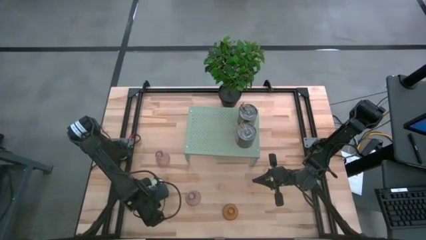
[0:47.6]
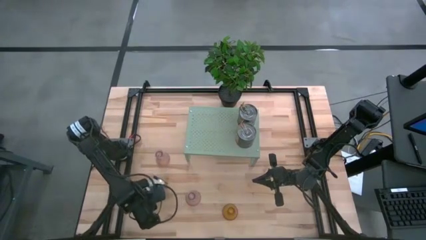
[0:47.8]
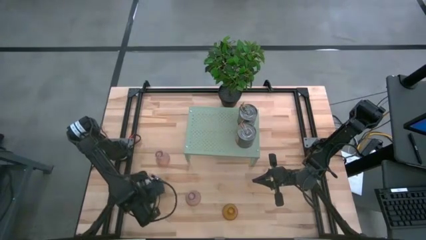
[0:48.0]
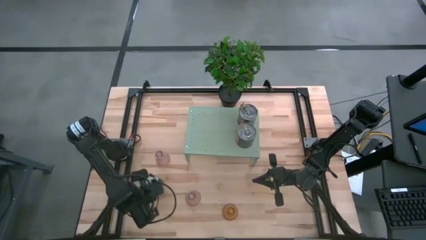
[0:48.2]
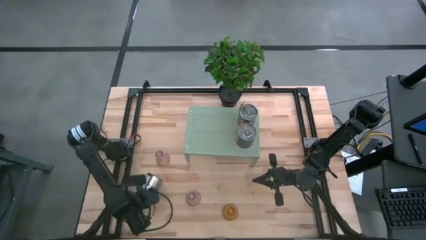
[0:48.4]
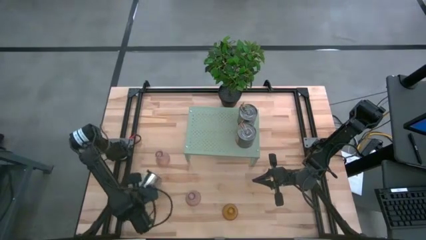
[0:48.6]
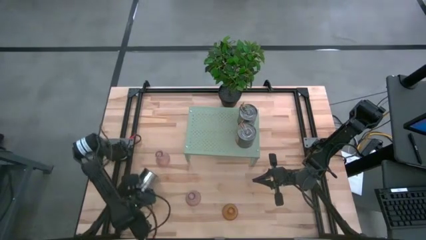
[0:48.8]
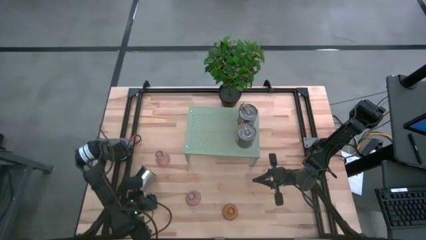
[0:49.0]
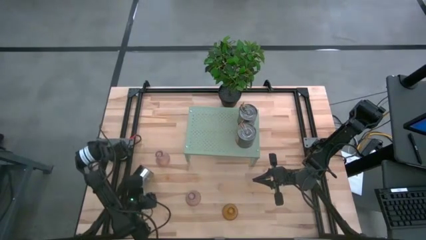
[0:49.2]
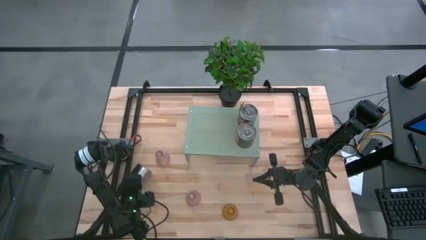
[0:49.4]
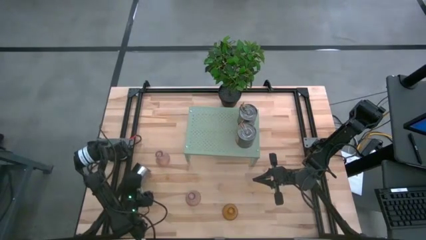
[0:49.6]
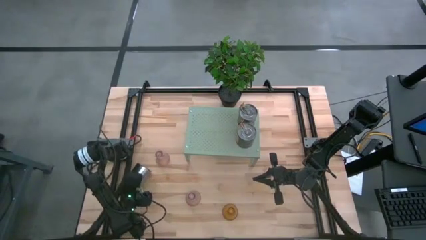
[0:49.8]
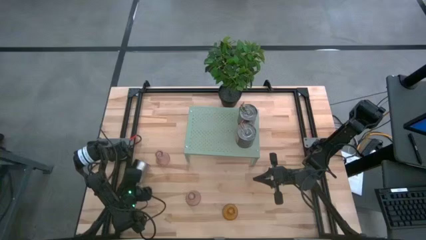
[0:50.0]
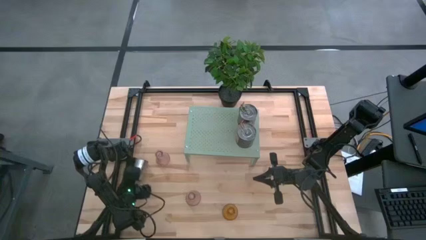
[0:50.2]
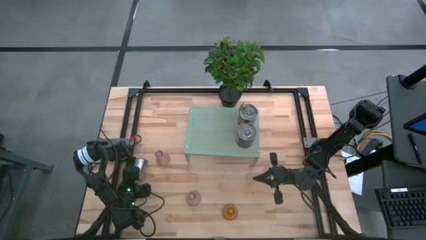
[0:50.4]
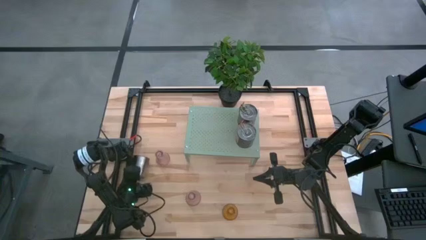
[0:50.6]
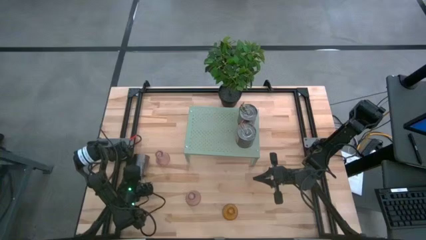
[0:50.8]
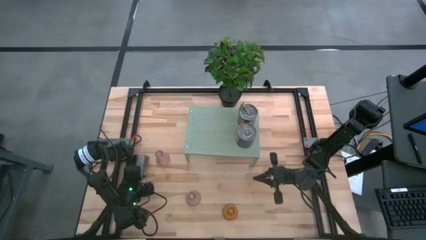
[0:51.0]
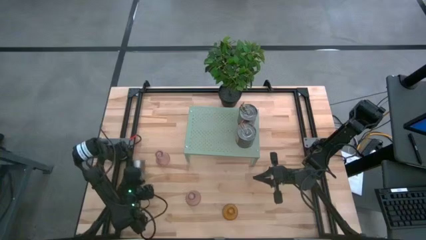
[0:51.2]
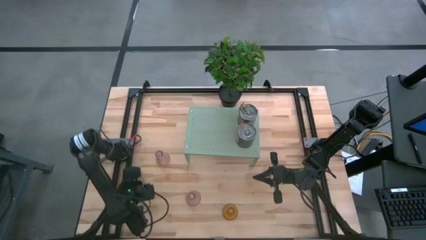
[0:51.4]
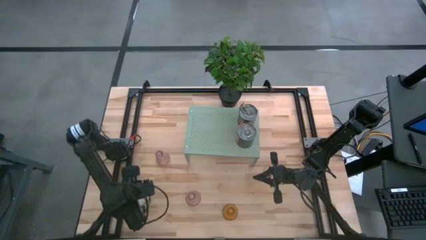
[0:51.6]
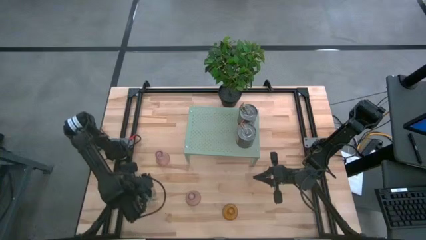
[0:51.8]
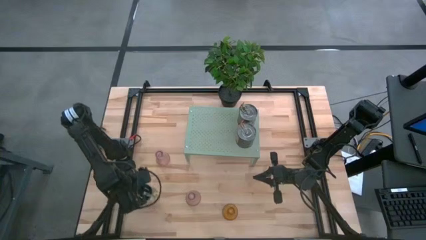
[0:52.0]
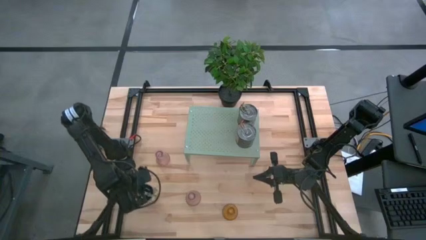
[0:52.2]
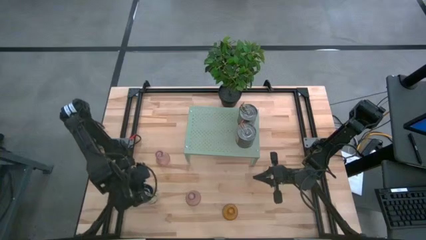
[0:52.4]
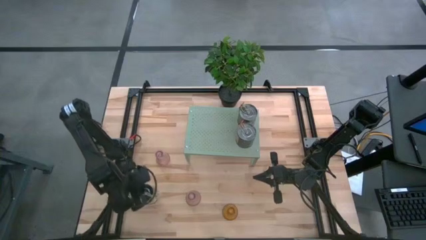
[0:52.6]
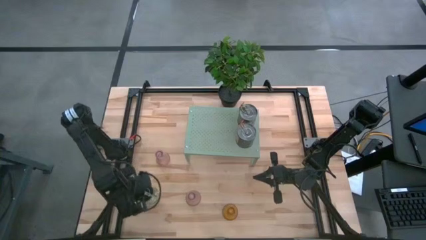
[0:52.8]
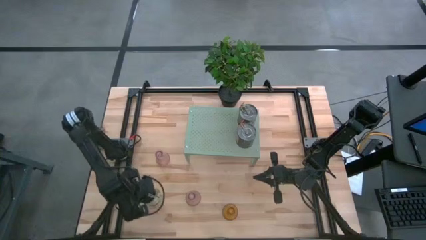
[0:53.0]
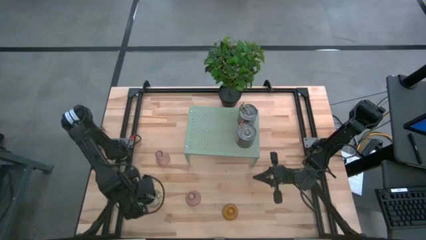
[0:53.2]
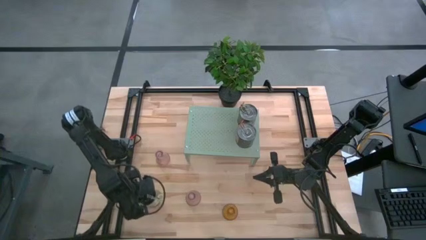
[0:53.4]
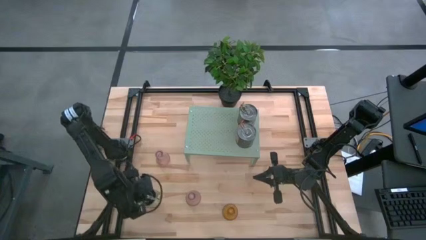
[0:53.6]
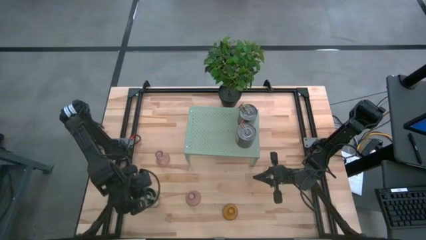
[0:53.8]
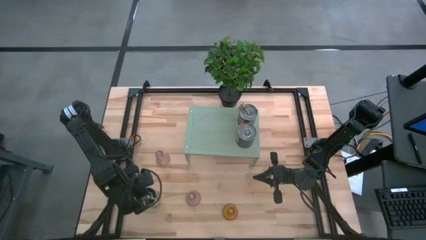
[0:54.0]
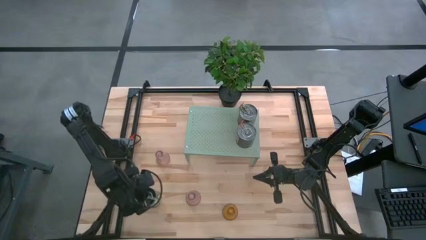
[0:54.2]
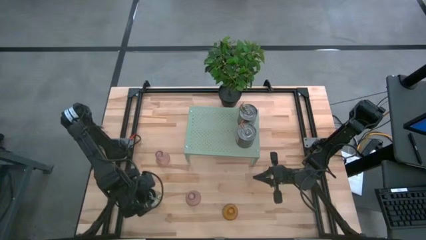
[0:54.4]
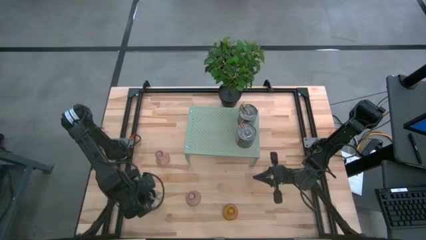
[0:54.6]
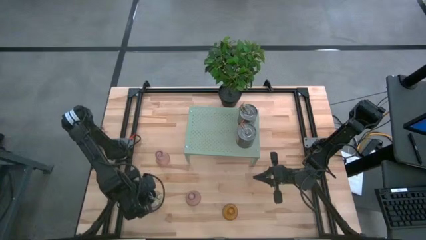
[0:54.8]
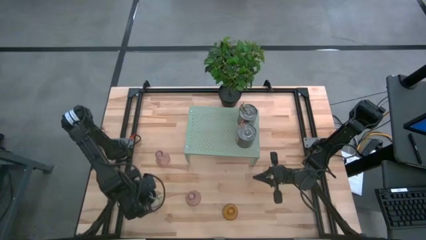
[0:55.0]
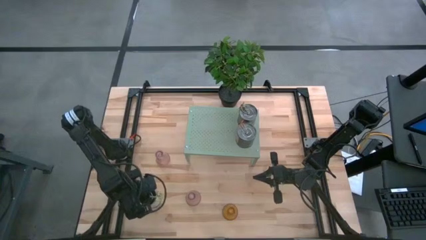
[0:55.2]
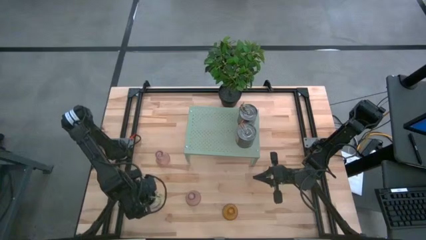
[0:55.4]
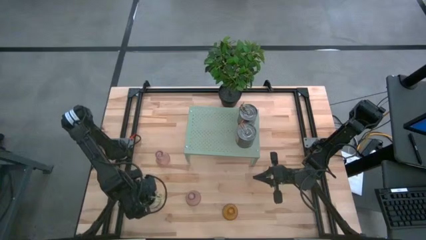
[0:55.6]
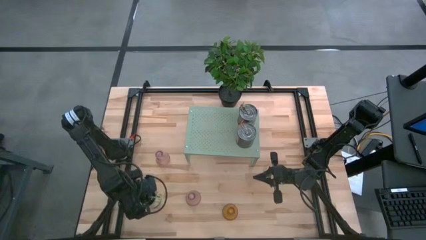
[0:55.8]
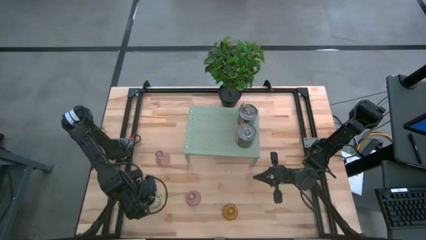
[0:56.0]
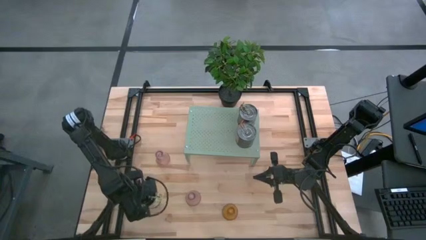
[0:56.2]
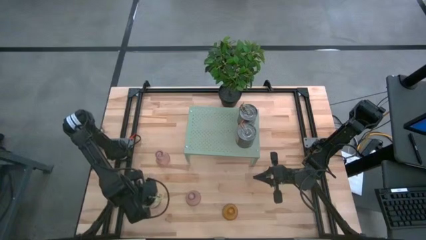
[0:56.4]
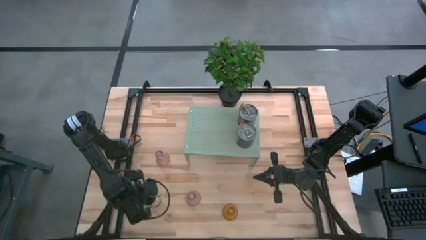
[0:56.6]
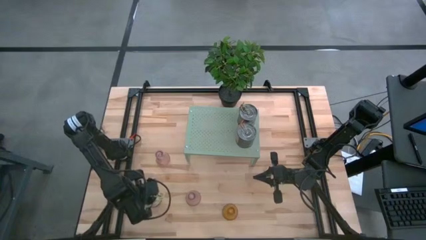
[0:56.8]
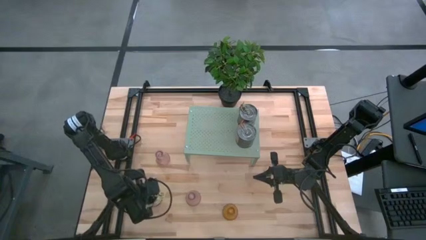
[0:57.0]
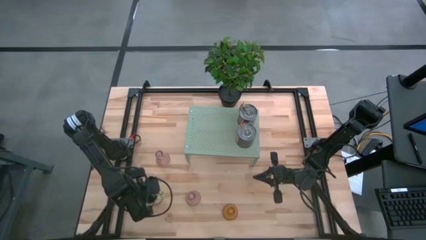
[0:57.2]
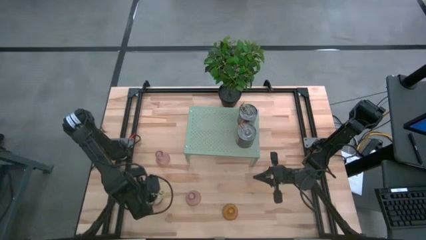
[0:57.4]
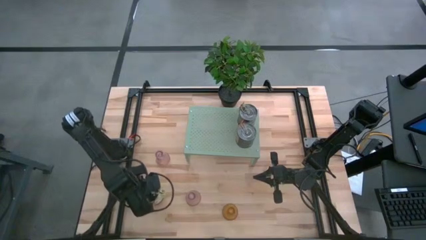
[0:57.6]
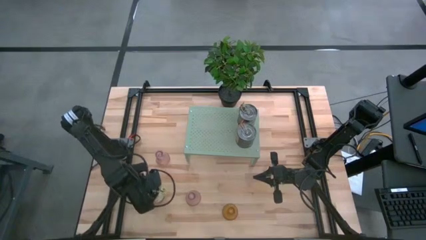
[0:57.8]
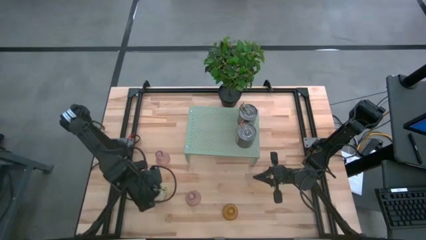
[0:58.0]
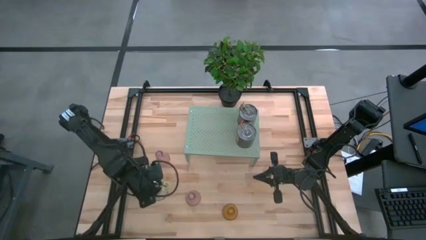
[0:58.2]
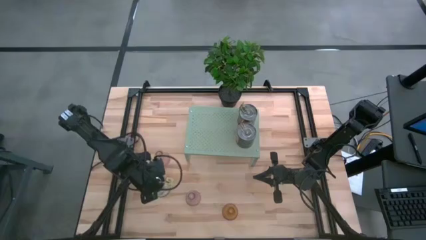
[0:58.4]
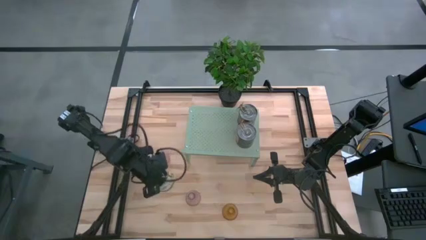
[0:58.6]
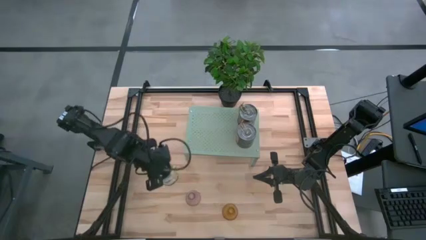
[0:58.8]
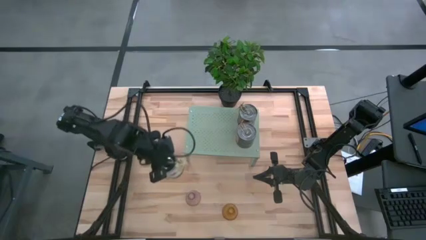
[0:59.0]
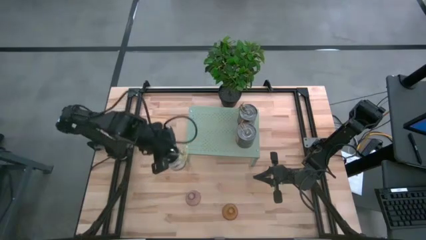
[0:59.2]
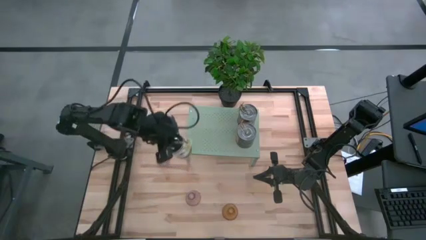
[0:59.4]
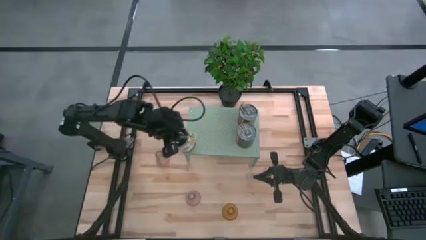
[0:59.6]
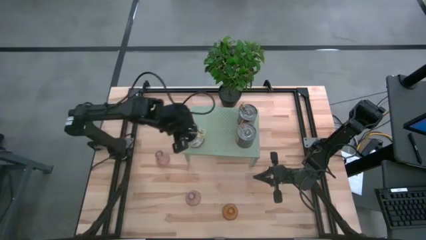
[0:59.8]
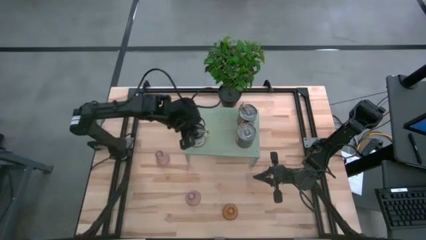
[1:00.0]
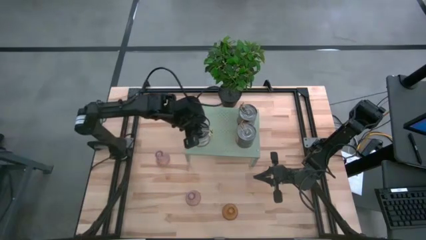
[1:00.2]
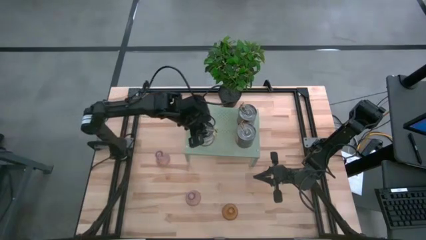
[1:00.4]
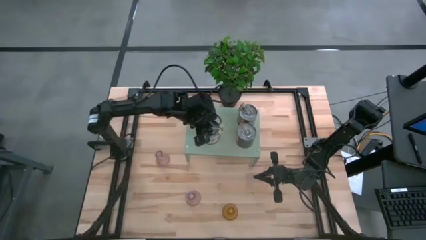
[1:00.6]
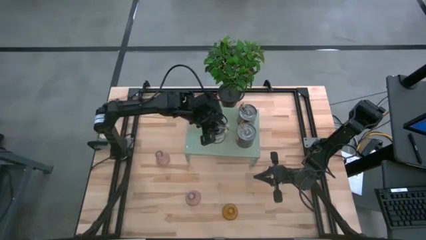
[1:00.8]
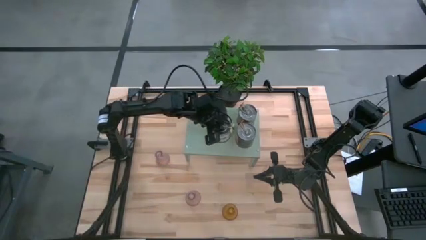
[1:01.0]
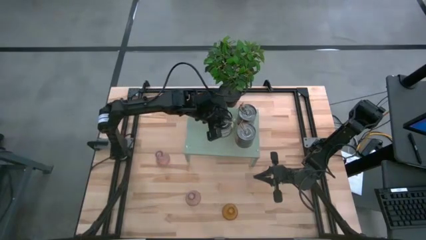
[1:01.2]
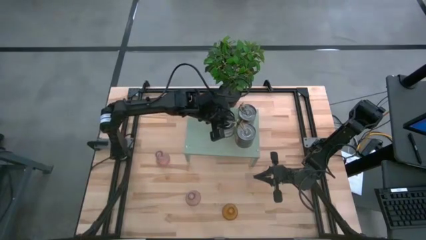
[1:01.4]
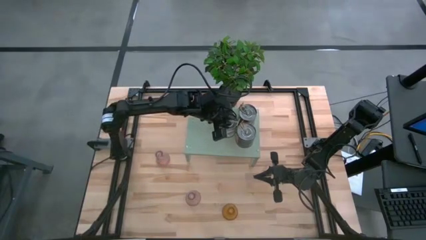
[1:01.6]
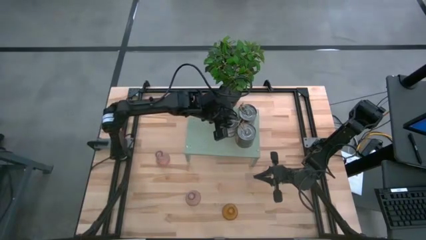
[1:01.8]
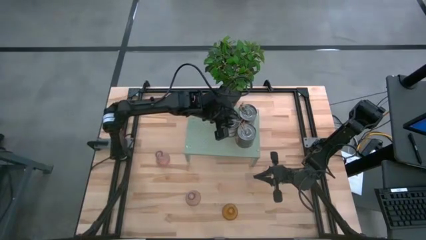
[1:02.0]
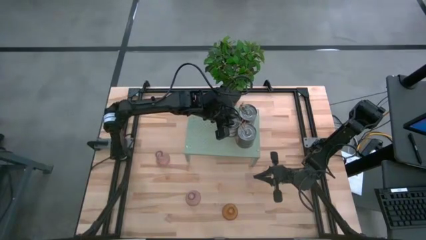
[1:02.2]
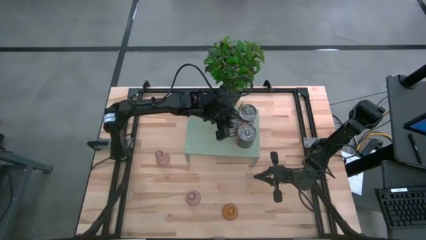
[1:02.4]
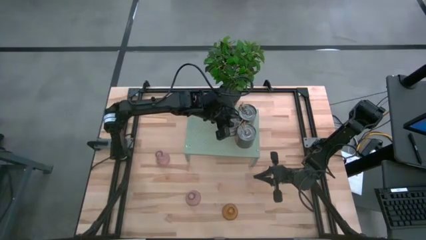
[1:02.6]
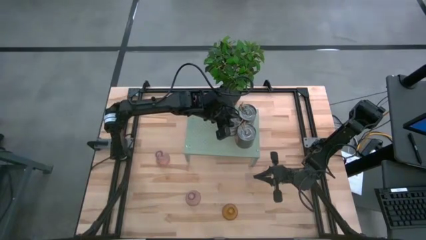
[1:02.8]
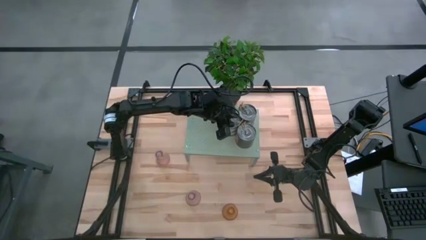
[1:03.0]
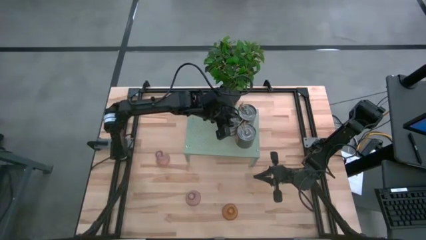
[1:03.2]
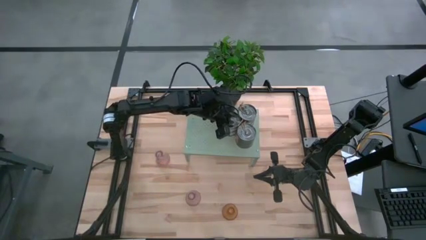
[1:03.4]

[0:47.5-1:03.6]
Task: Pick & Place candle stick holders
Put the silver candle on the shelf

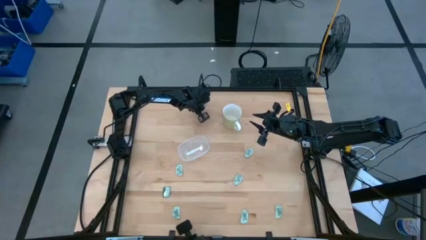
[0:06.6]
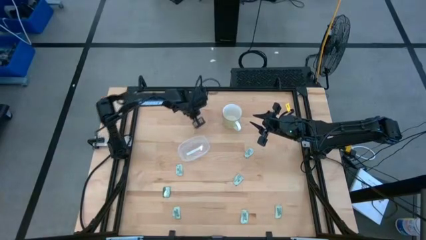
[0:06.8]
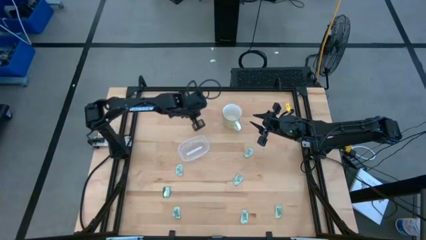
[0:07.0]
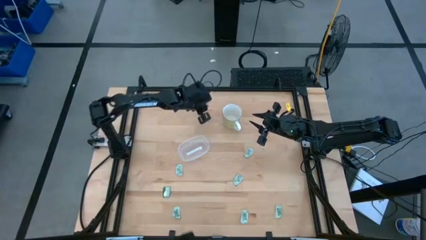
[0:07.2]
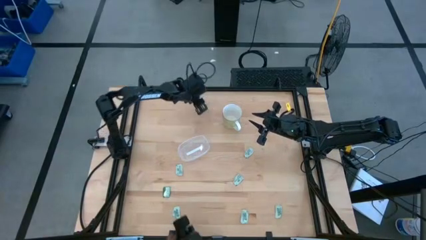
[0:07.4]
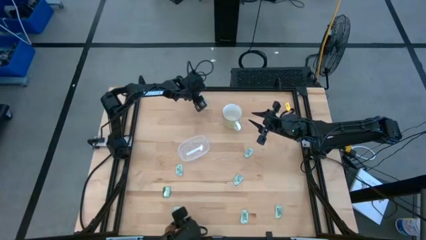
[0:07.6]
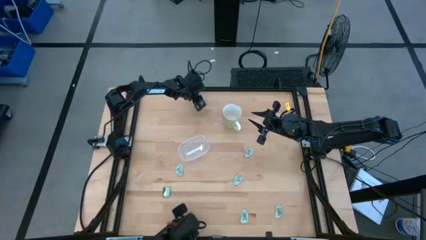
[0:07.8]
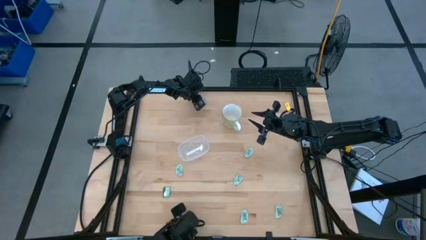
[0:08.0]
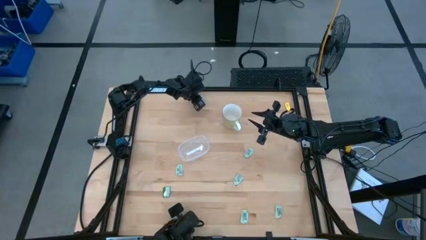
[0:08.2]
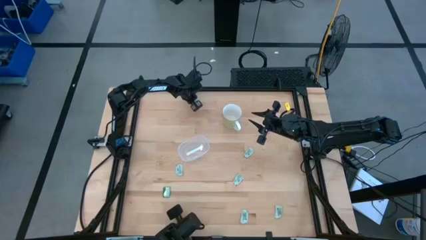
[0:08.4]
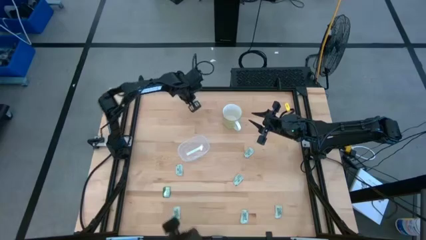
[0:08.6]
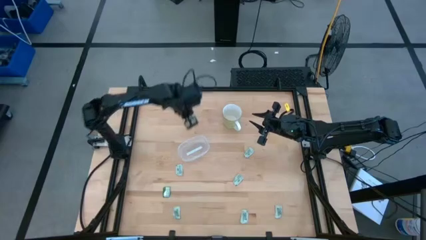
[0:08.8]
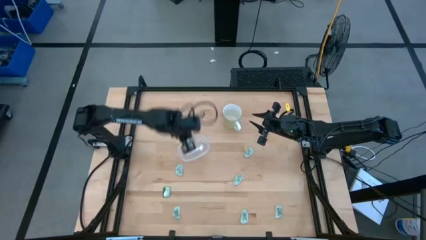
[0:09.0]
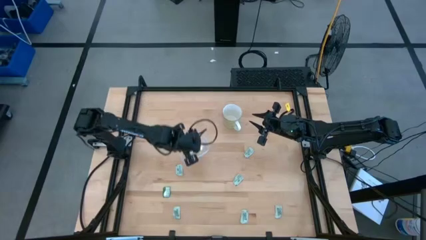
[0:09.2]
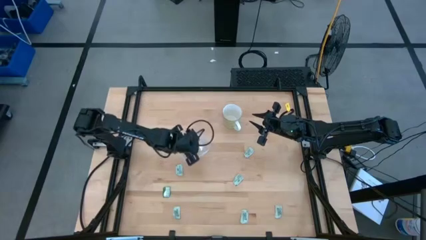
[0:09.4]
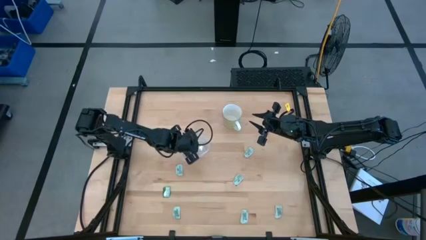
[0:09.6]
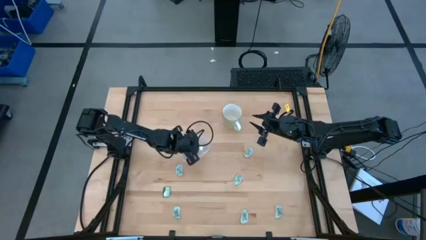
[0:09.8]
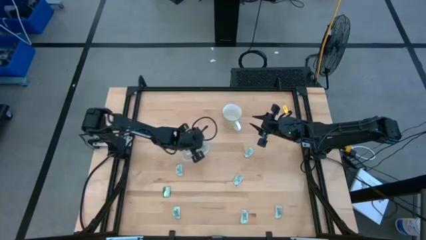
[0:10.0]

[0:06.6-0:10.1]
Task: Pick and place Stevia / Truvia into bins
Put the white stevia packet into the bin
